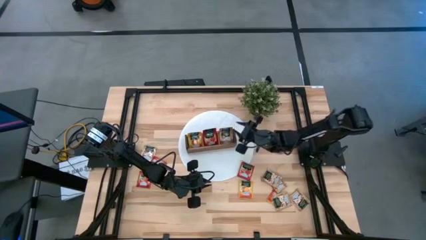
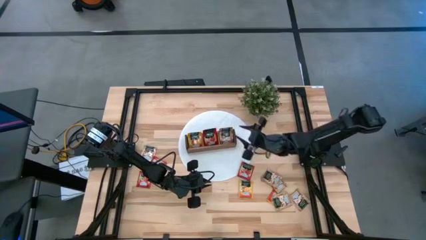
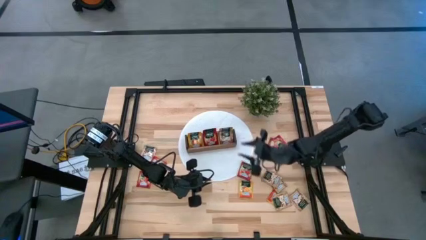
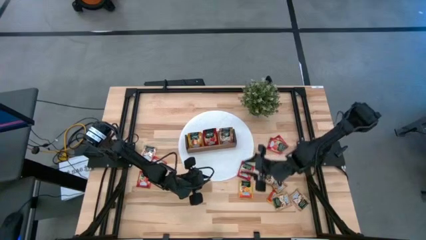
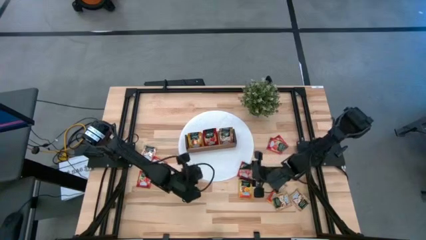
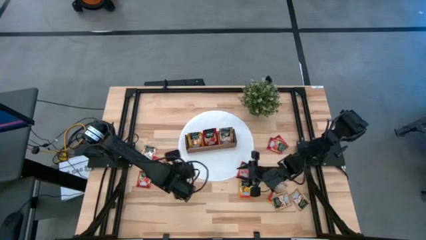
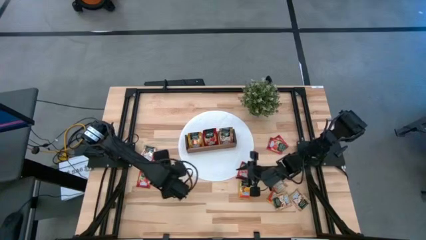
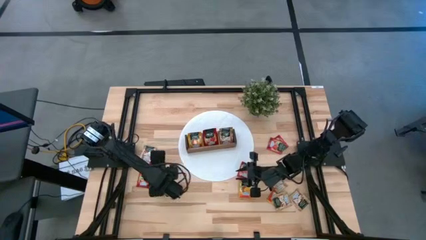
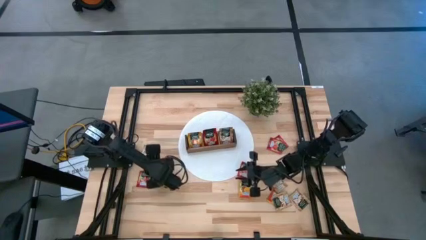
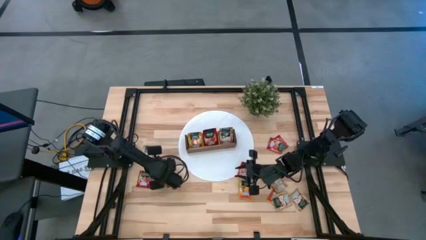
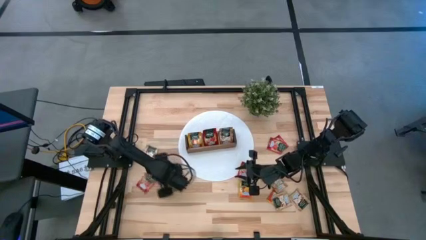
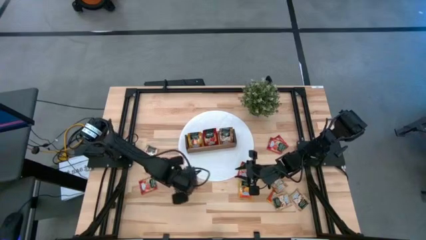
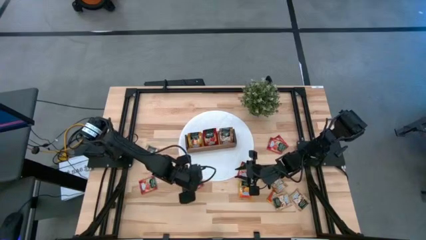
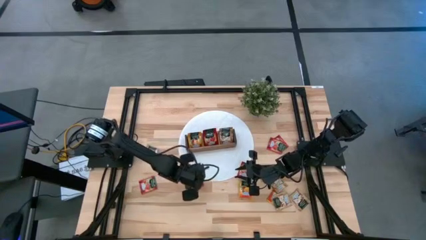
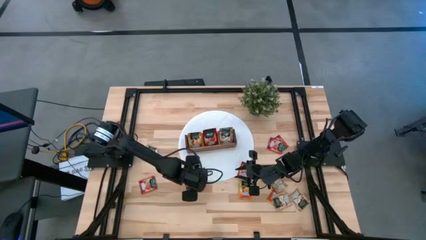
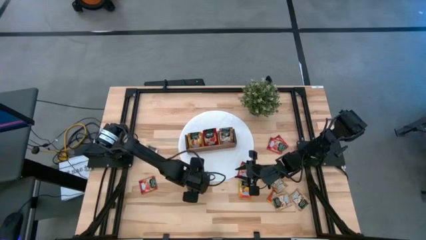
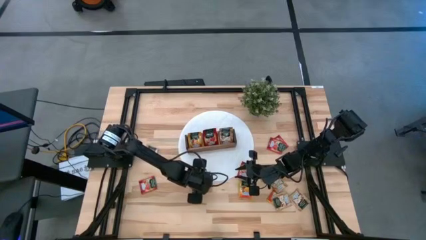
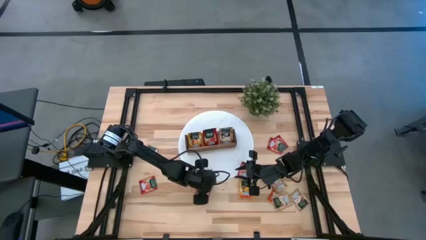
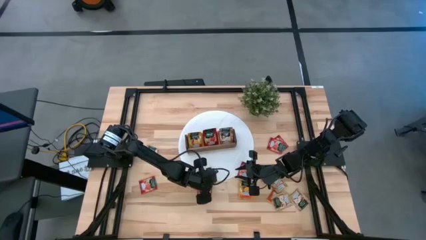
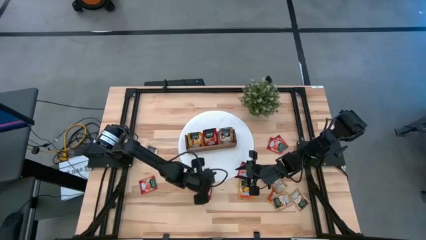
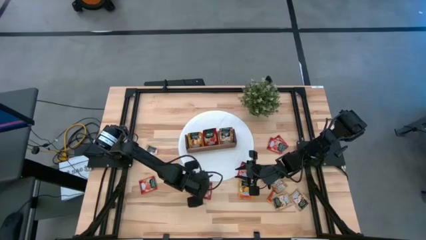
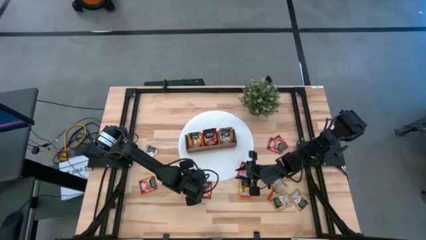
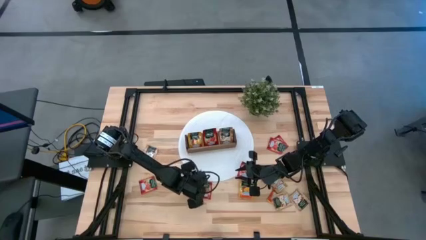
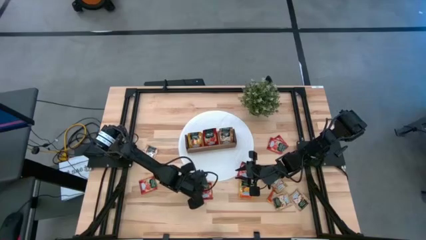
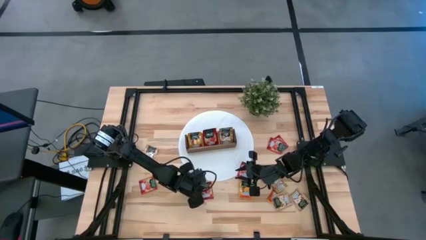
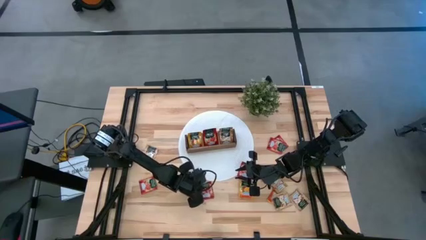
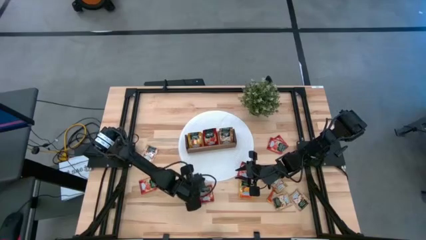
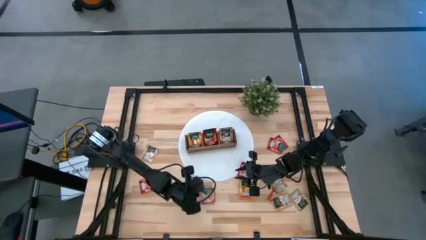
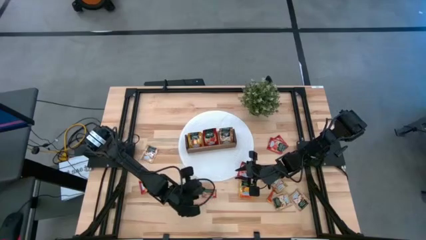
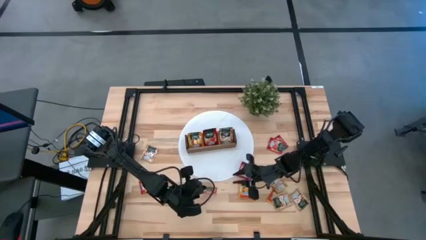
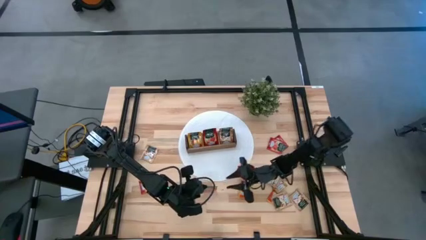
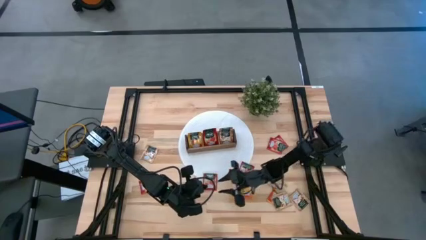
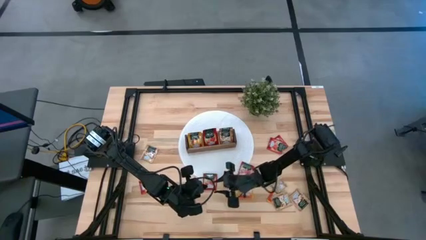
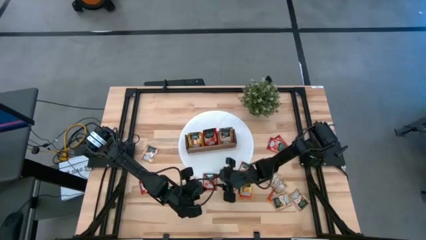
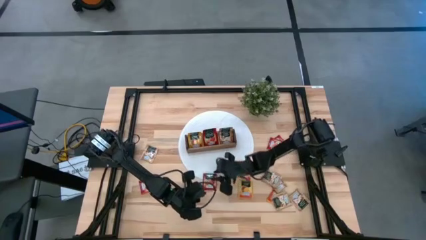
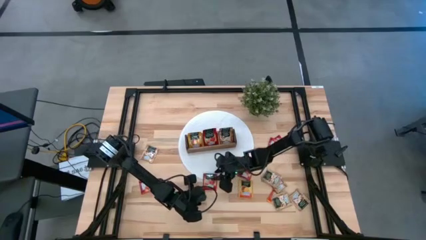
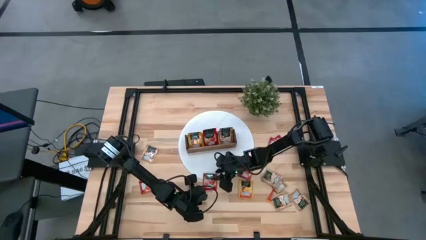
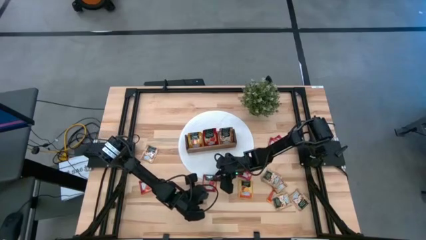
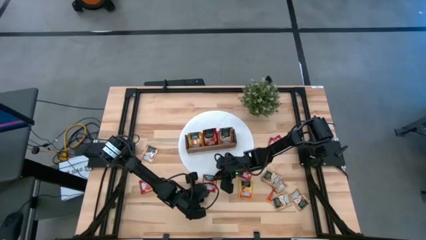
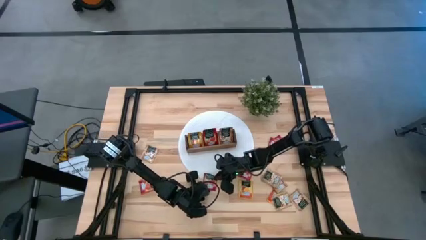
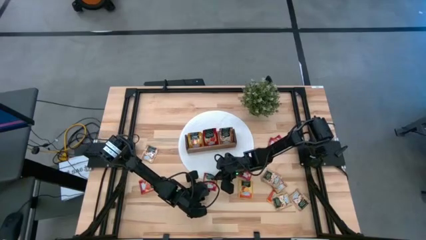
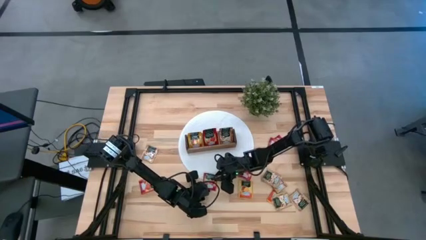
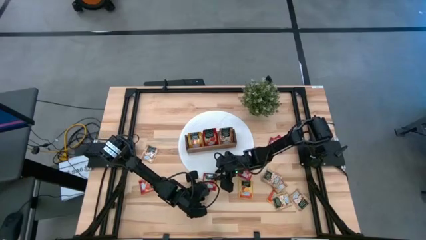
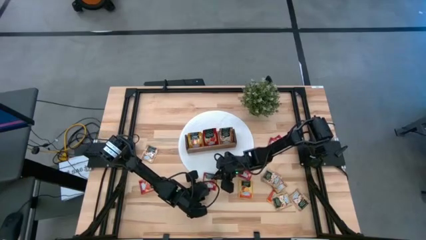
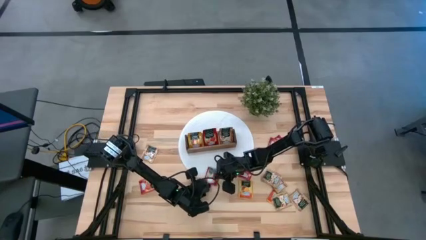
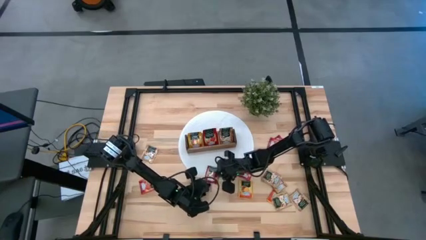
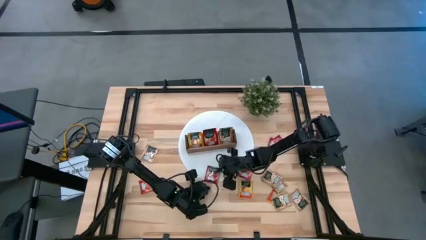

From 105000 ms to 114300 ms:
Task: Pick & Place Tea
Put the red tea bag into the middle section of the wooden organizer

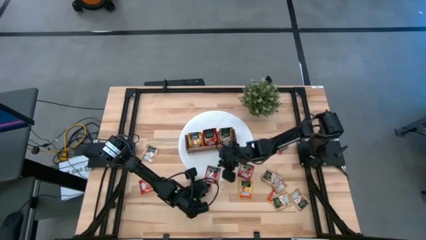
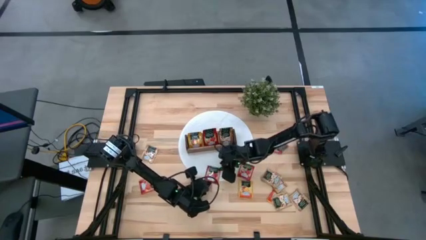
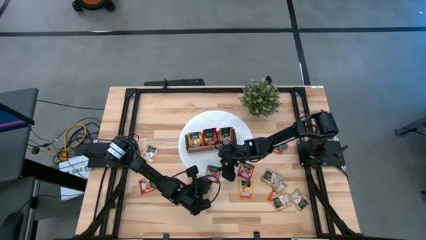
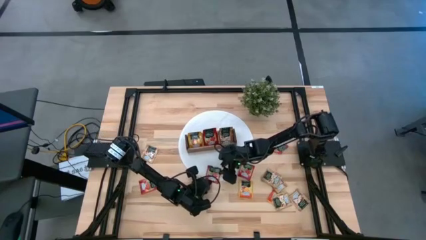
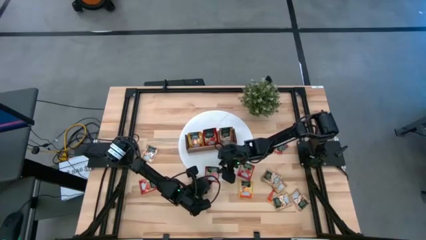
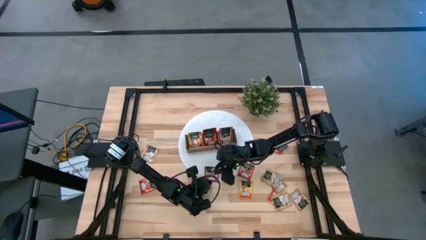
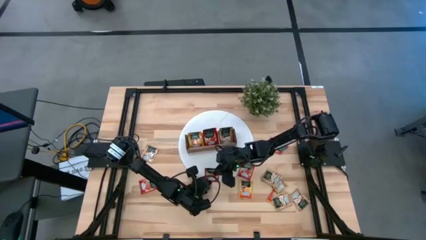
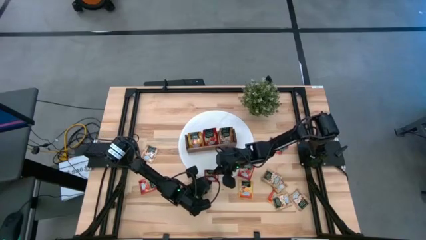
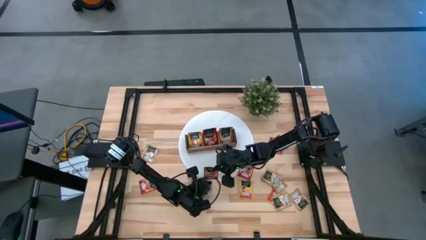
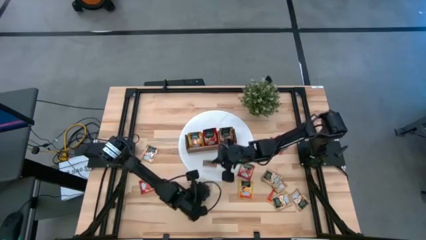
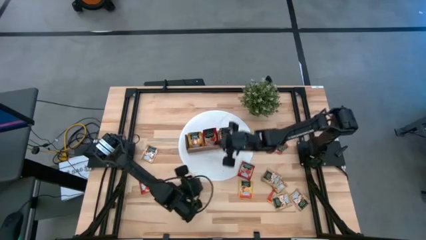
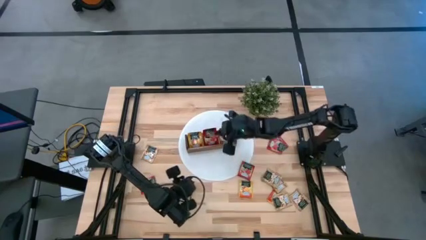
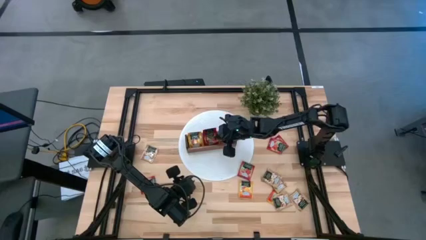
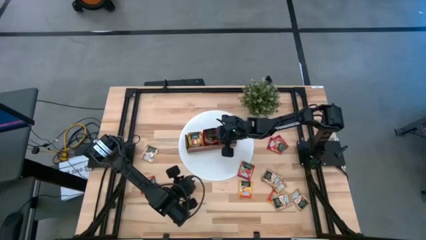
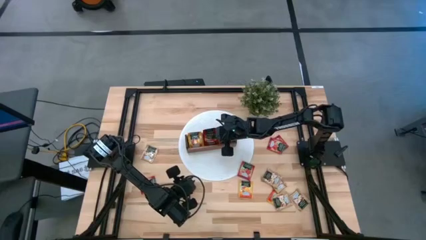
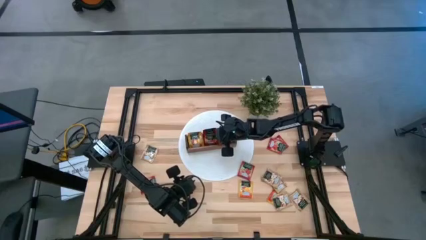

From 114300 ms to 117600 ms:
Put the red tea bag into the middle section of the wooden organizer
